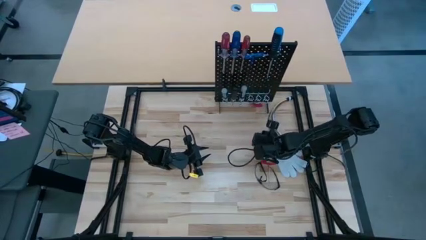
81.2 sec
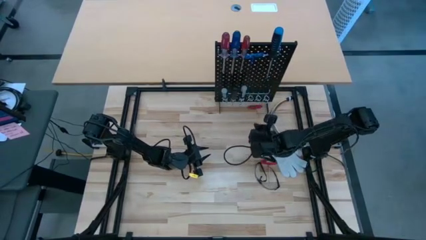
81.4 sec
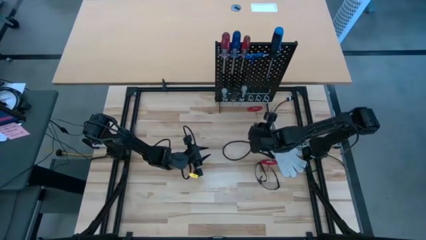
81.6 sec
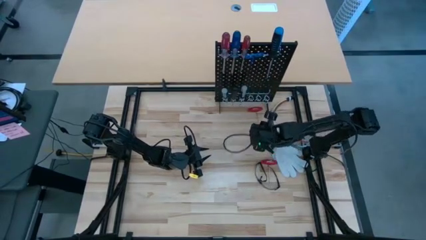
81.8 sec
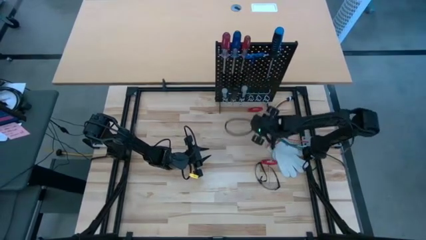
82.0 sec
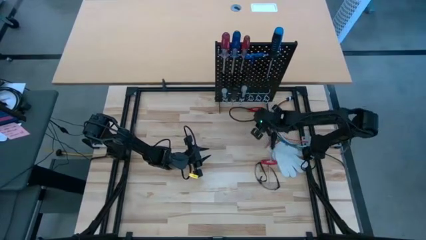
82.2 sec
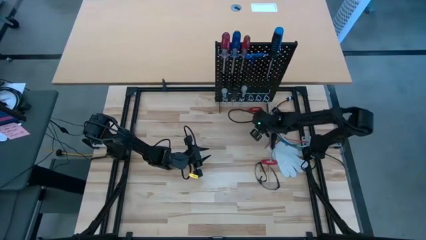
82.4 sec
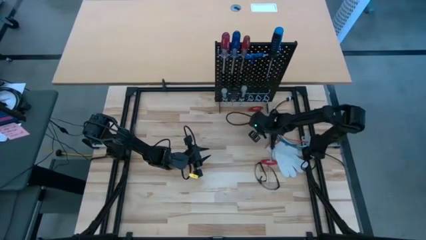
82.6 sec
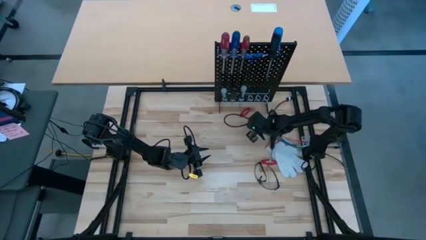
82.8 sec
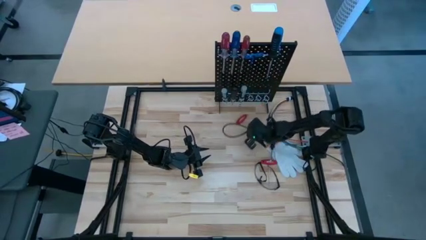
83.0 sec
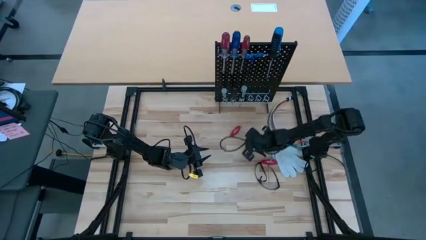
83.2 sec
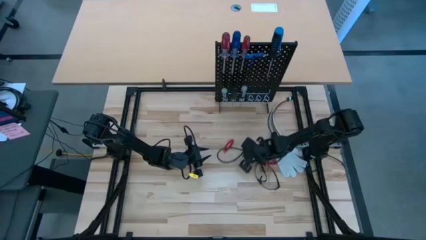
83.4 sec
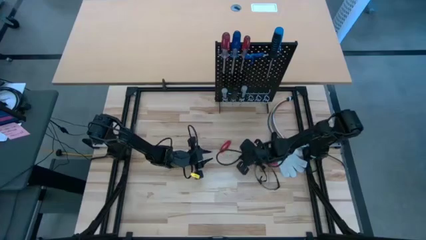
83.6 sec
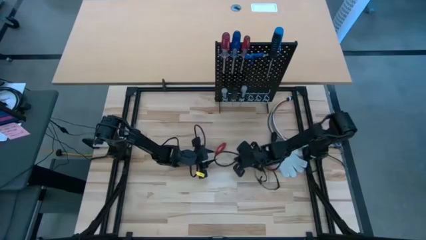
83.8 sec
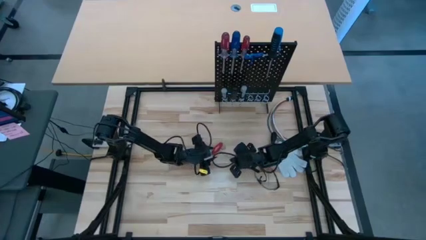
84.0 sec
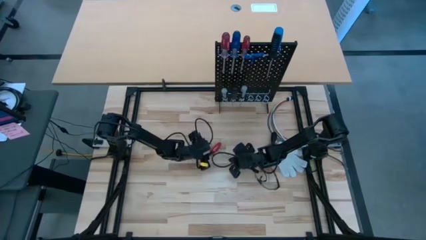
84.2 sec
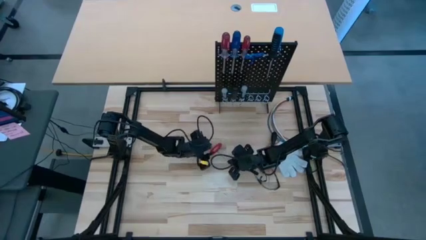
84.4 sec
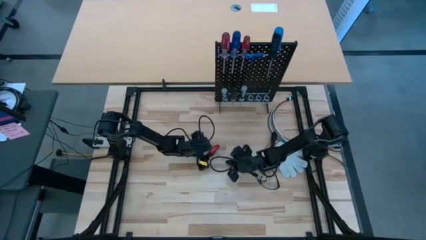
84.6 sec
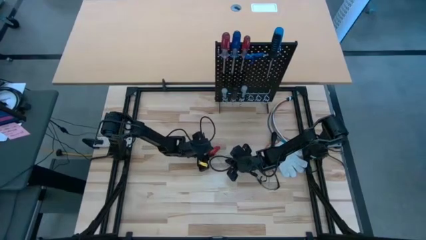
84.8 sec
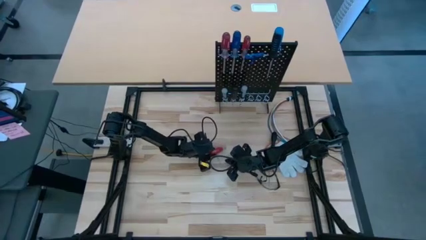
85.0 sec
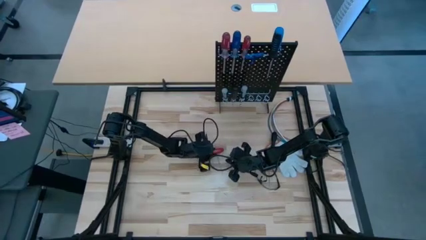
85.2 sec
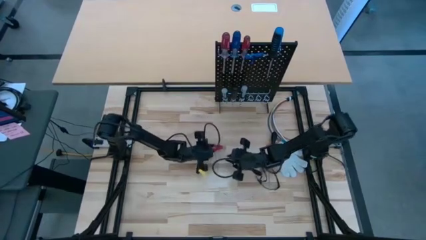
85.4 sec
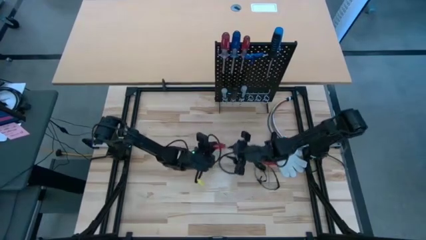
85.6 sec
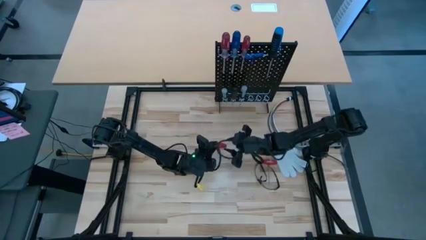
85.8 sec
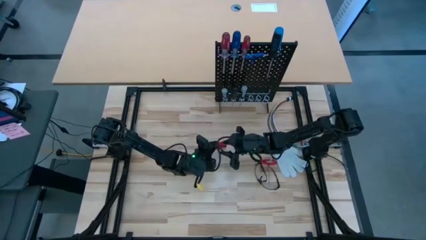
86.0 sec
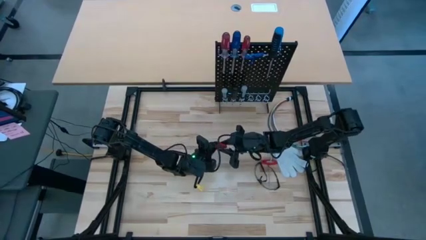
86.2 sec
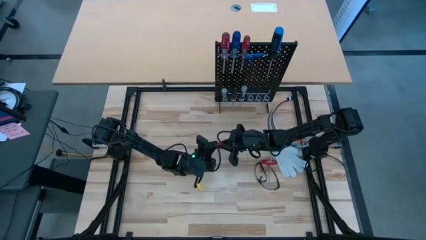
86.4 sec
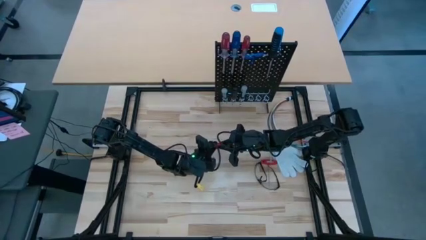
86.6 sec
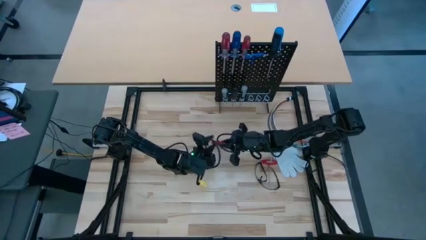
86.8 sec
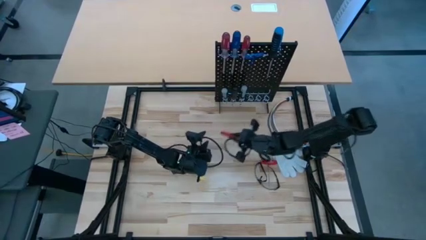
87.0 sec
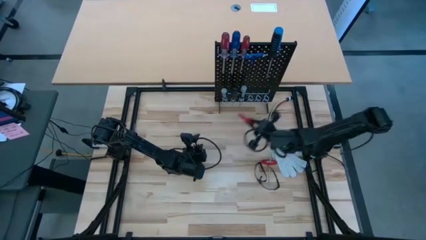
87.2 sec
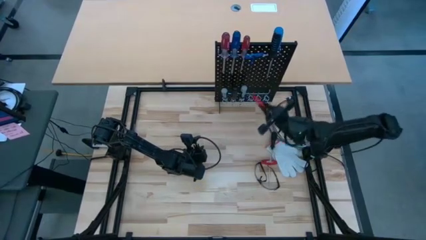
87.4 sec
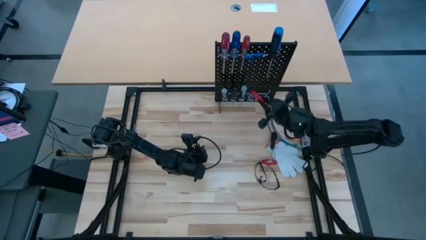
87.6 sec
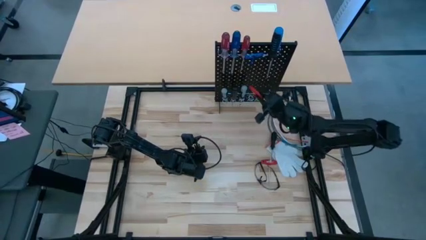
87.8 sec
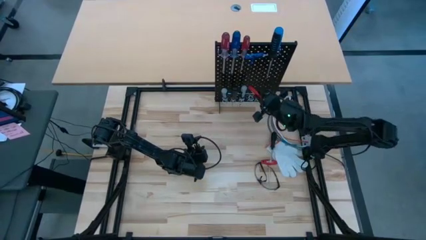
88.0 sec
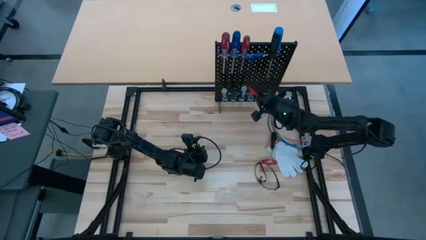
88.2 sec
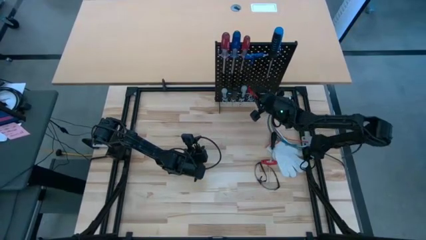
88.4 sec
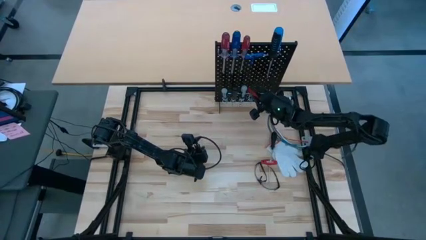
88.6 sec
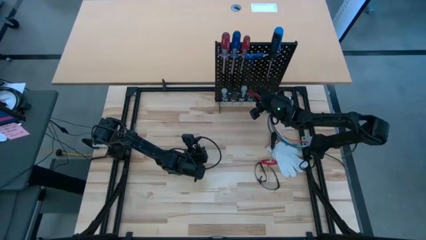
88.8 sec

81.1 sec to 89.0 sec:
Task: Hang tools onto peg board
Hang the left red Allen wrench on the pegboard

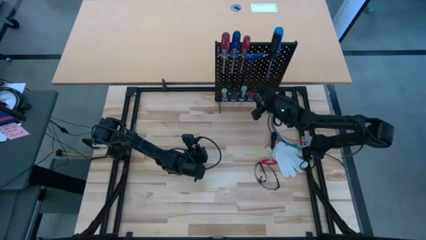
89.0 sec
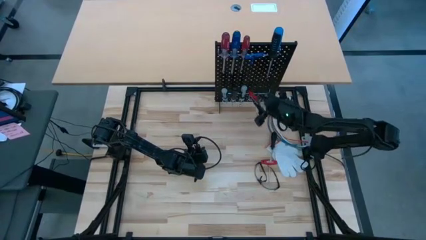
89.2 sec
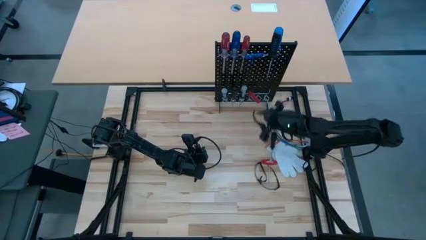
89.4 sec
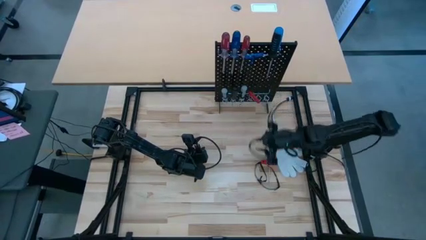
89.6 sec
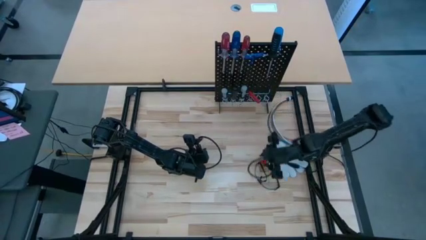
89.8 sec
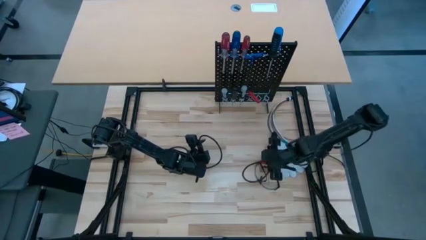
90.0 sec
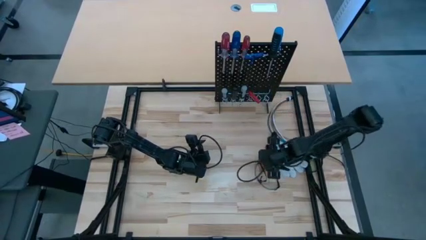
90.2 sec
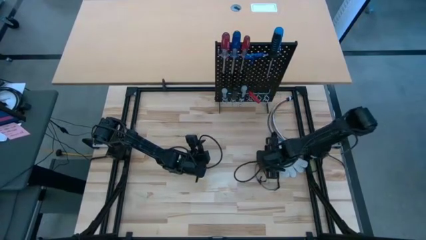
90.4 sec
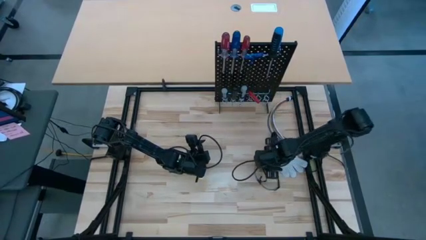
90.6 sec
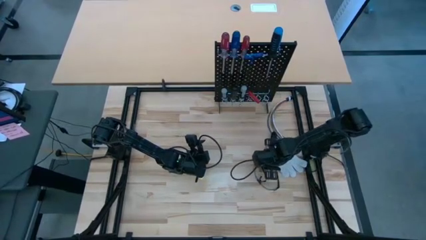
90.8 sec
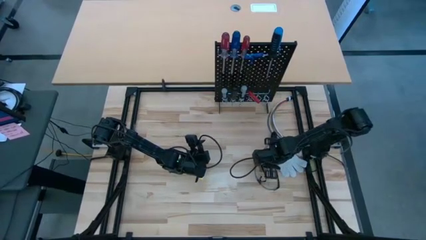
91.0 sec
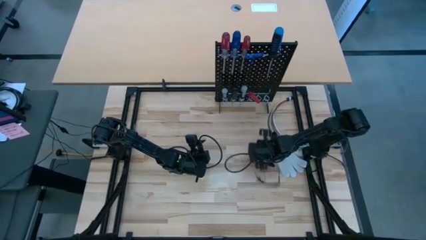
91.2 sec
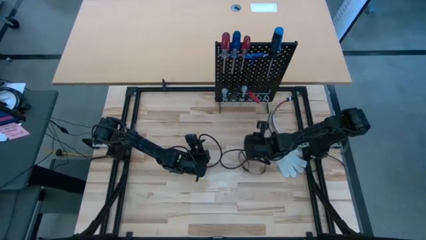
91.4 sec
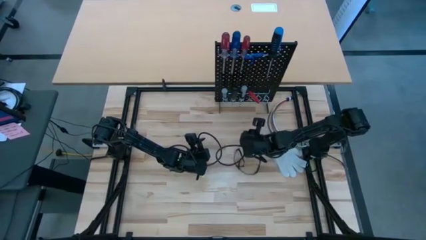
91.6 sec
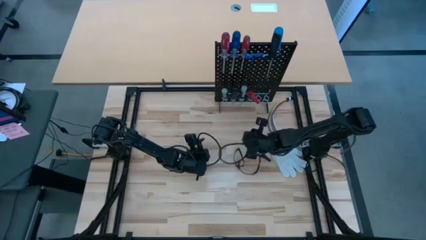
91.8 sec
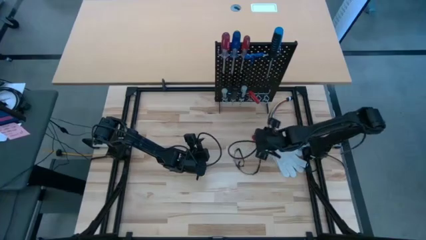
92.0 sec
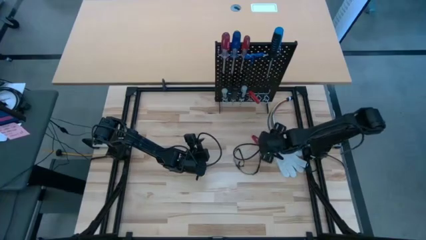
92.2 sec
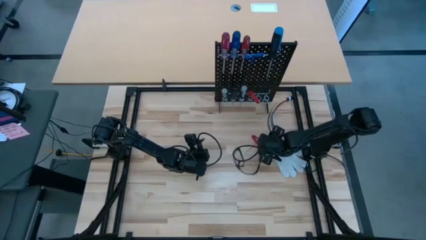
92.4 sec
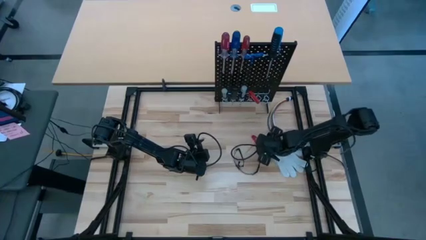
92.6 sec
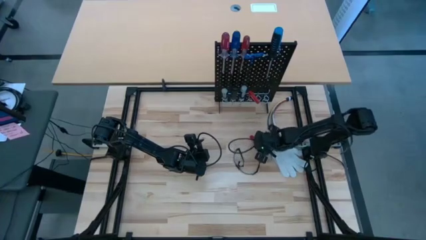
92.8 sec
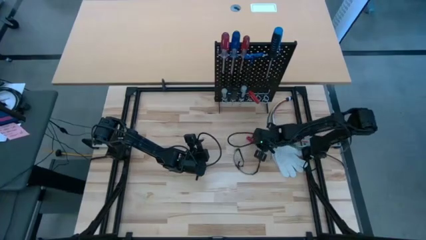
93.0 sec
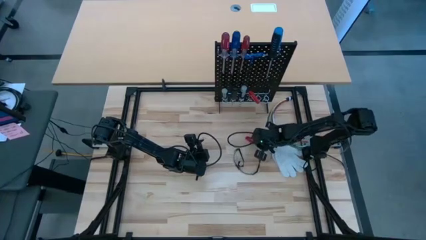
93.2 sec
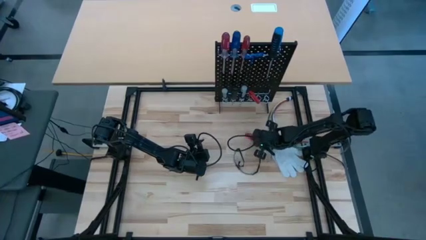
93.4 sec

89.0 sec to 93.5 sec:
Hang the red Allen wrench on the pegboard

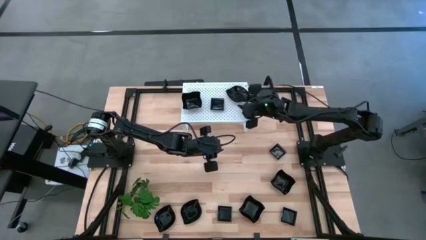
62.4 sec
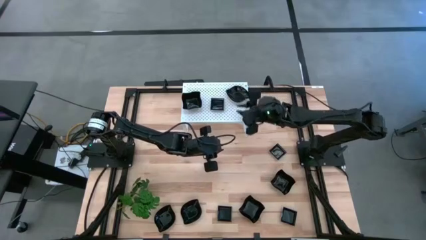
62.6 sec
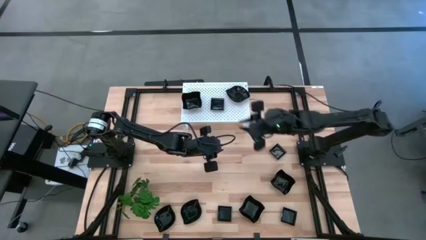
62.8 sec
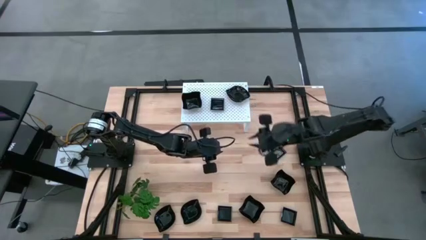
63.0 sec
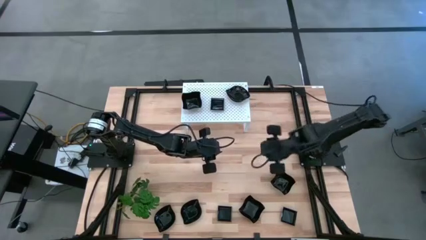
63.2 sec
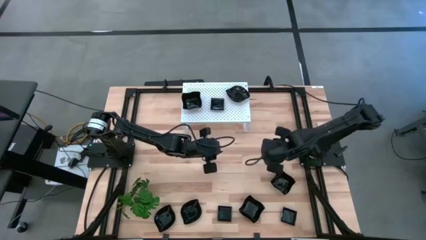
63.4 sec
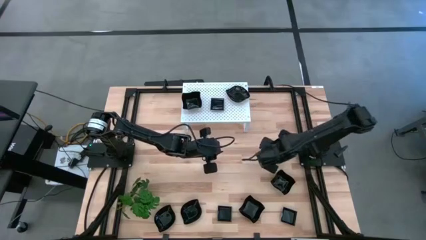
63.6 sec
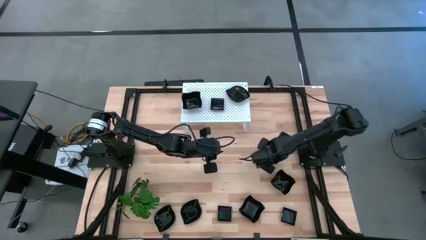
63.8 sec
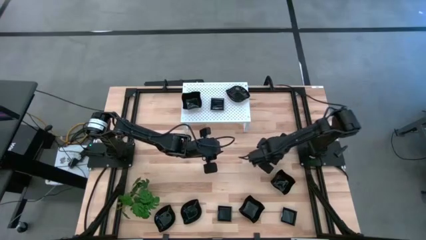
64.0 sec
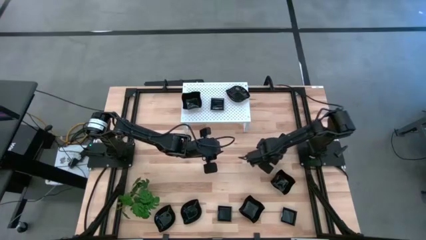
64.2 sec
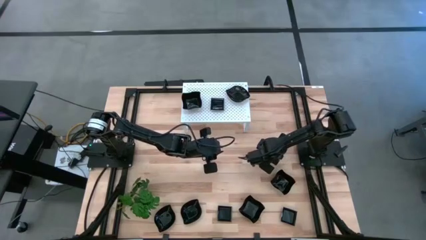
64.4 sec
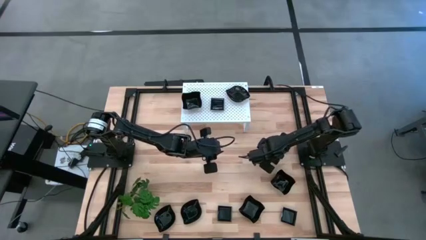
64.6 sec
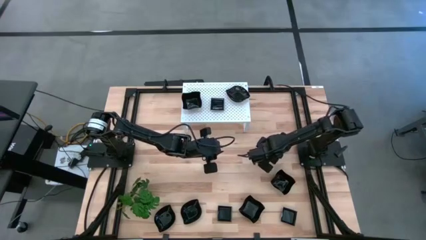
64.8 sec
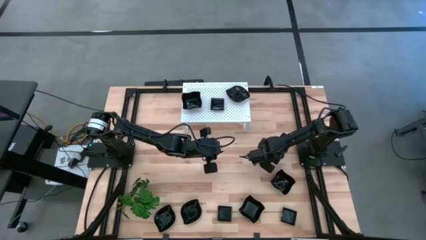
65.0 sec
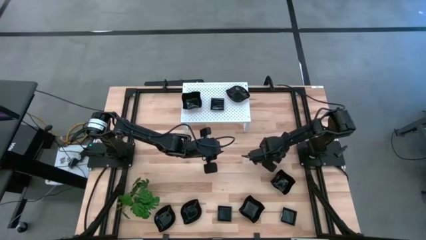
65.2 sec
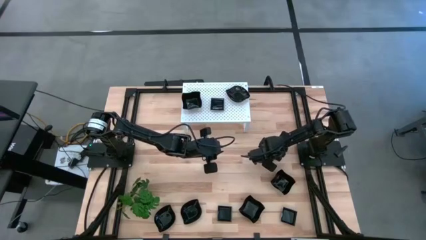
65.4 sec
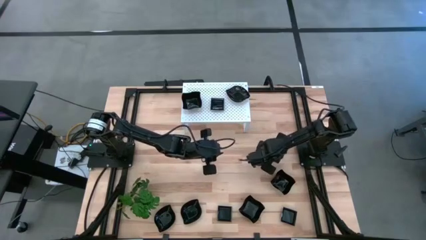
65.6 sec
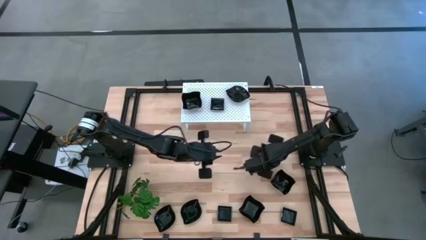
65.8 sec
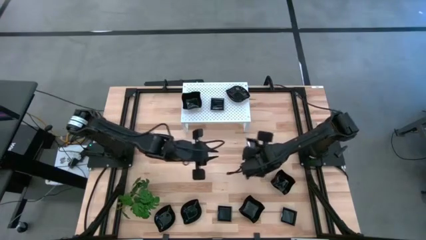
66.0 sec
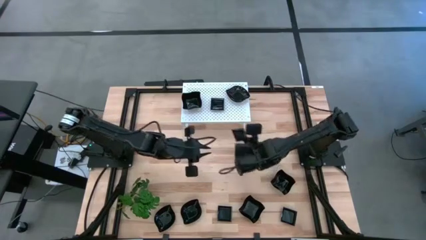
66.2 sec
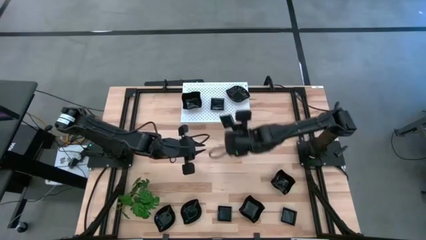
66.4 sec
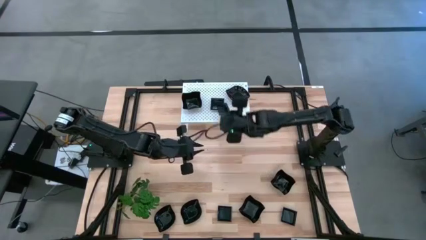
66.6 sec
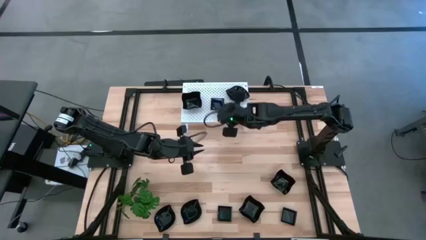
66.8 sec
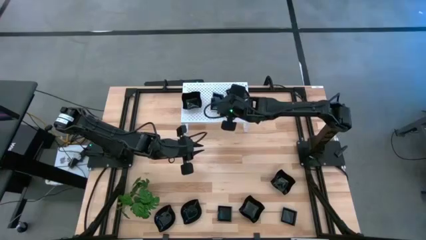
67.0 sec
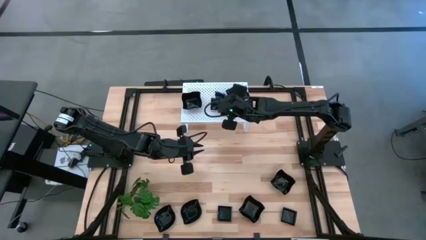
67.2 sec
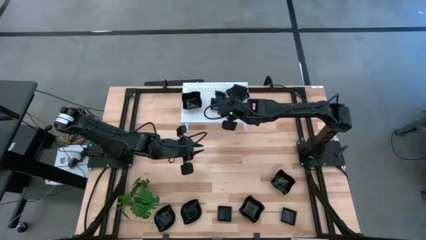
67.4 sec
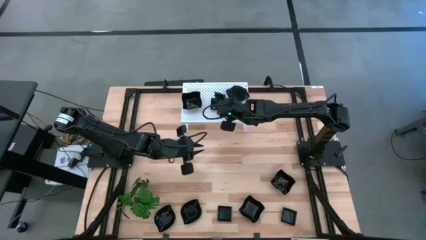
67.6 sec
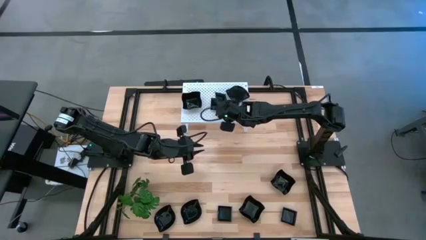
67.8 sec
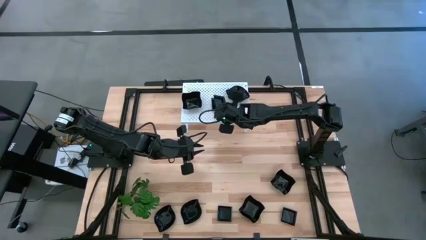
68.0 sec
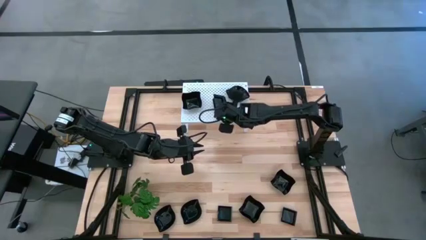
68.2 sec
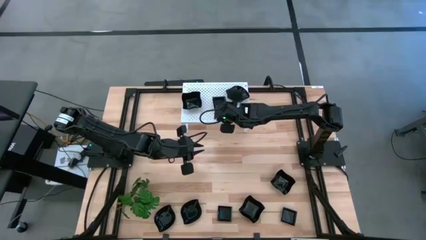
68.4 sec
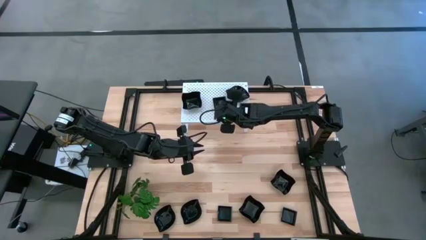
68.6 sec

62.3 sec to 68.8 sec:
Task: Pick & Place Mini shaped plates
Stack the square plate on top of the other square plates on the shelf
